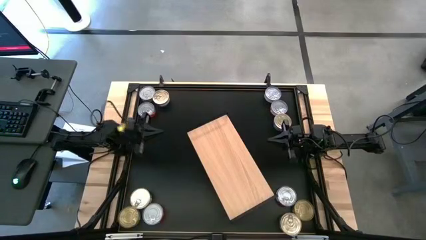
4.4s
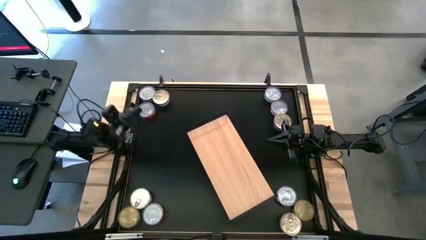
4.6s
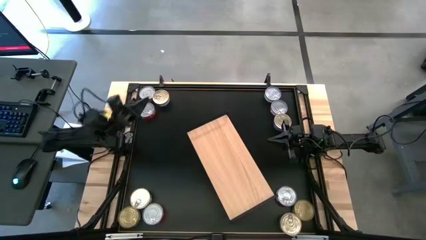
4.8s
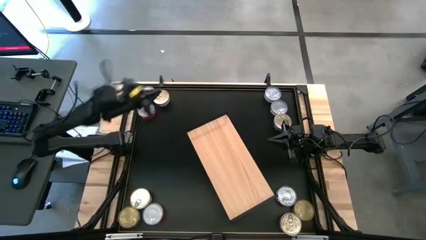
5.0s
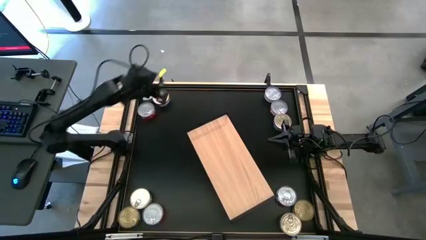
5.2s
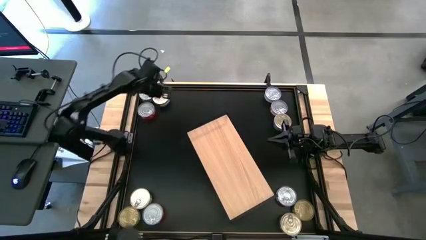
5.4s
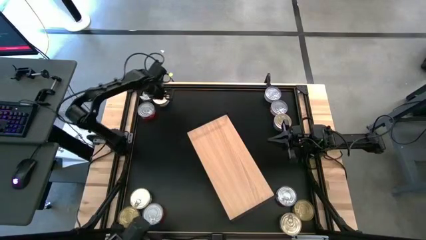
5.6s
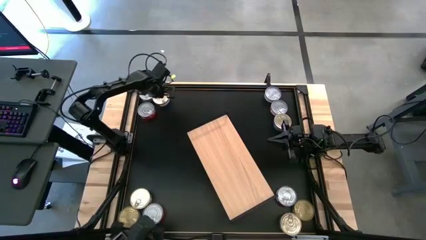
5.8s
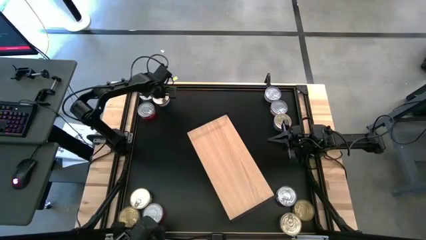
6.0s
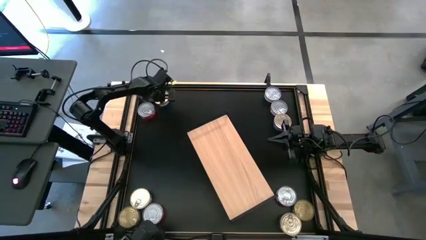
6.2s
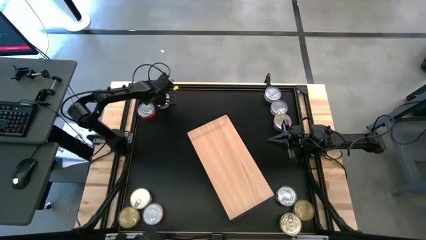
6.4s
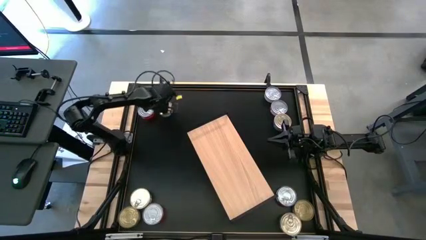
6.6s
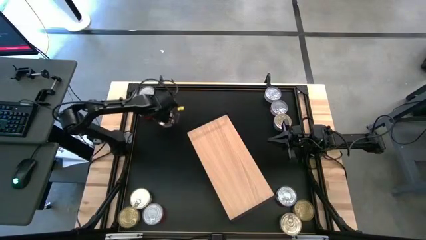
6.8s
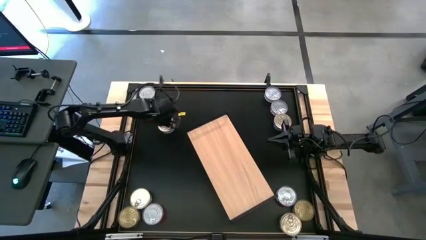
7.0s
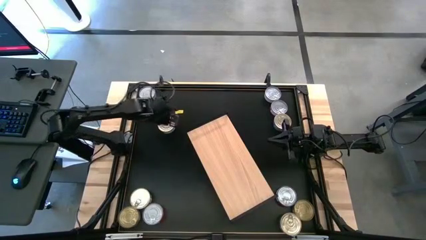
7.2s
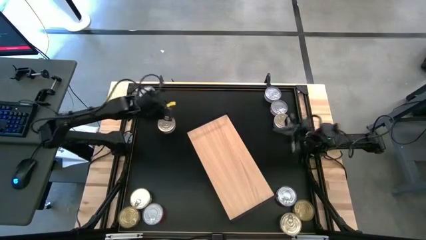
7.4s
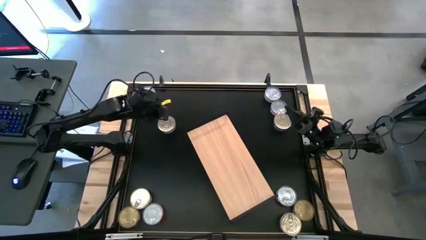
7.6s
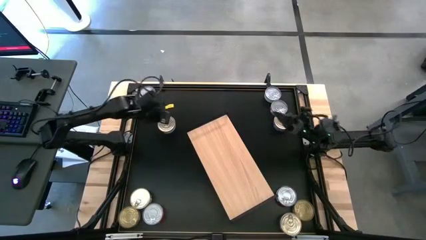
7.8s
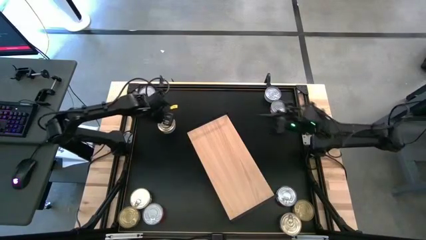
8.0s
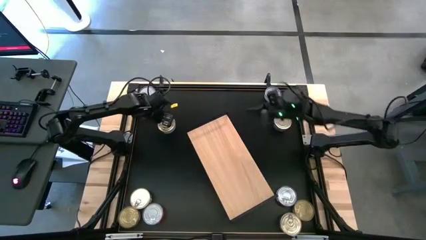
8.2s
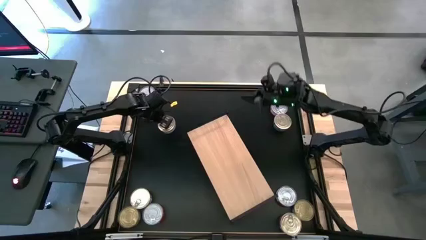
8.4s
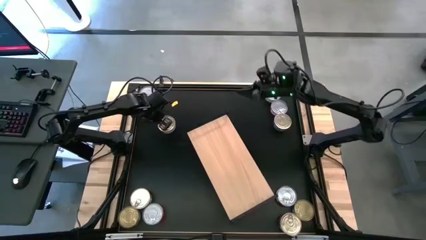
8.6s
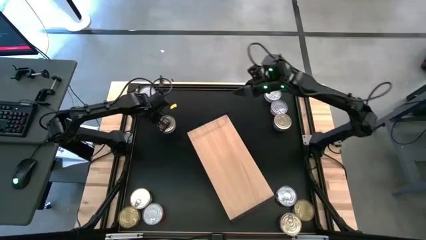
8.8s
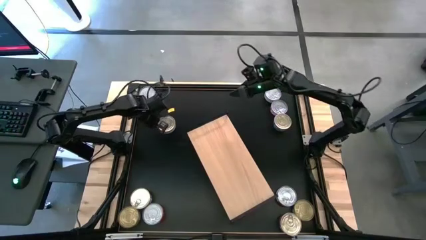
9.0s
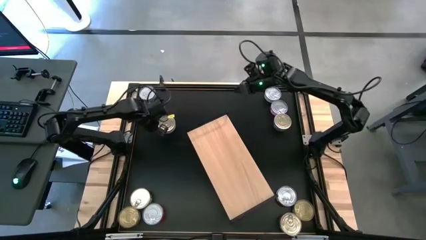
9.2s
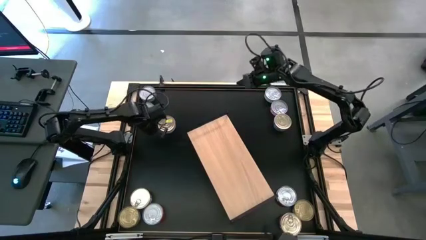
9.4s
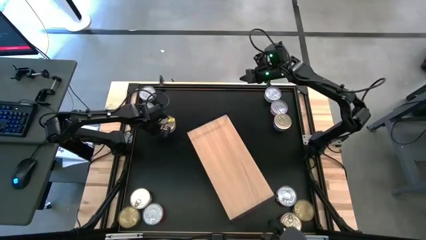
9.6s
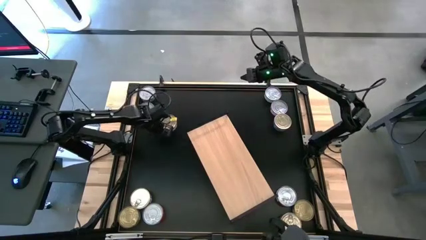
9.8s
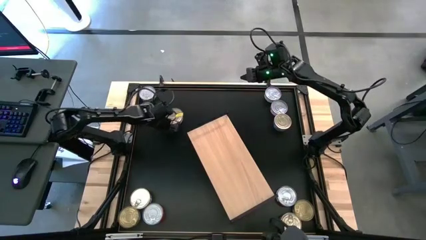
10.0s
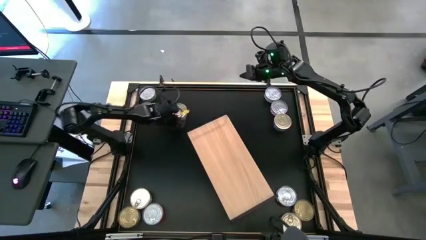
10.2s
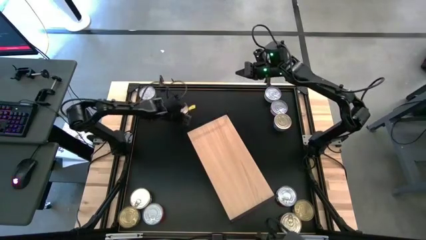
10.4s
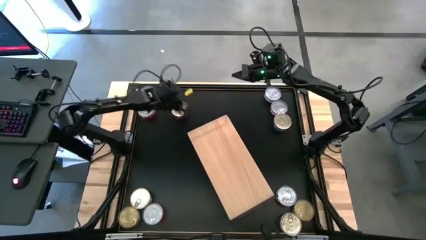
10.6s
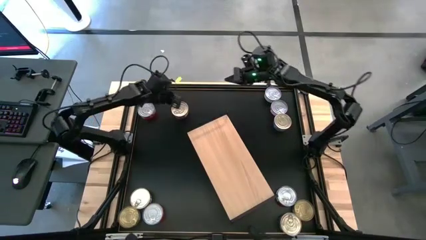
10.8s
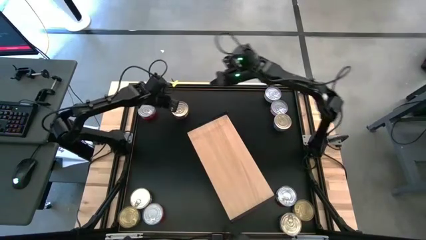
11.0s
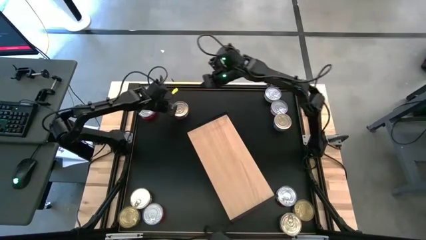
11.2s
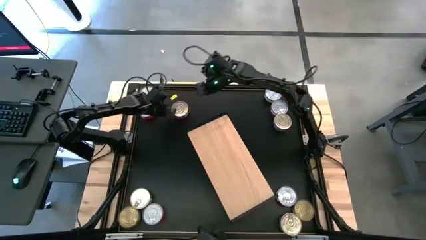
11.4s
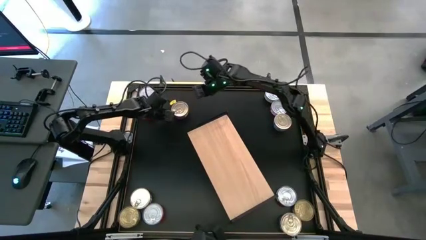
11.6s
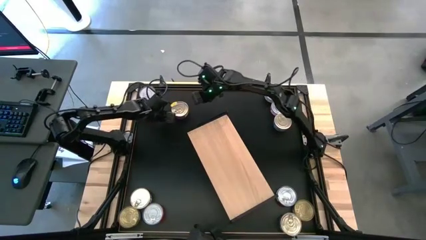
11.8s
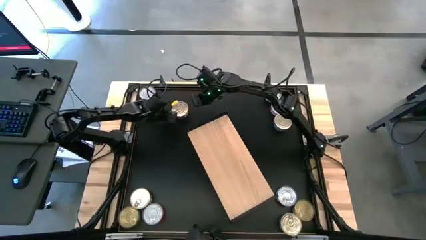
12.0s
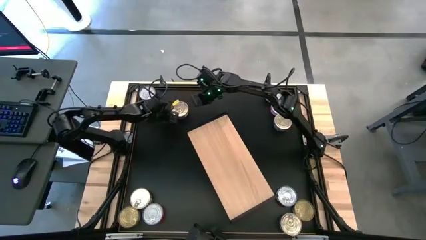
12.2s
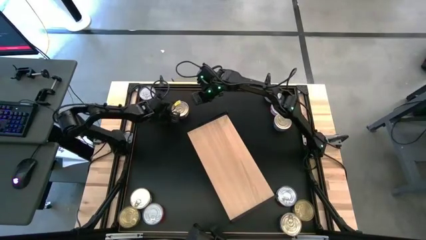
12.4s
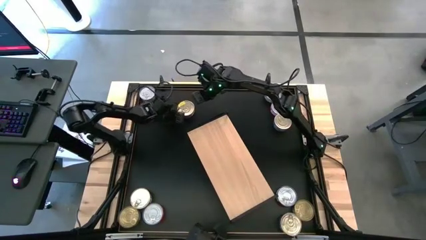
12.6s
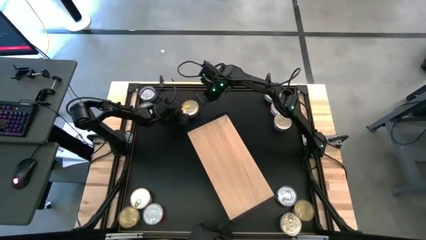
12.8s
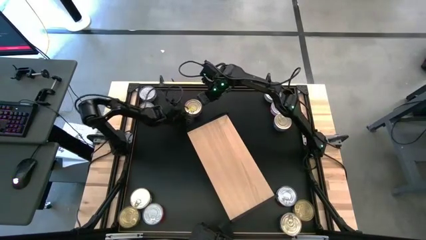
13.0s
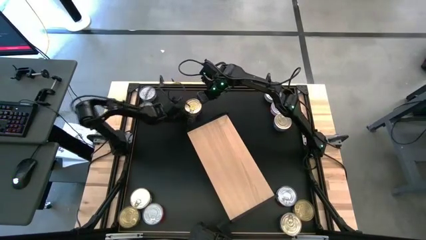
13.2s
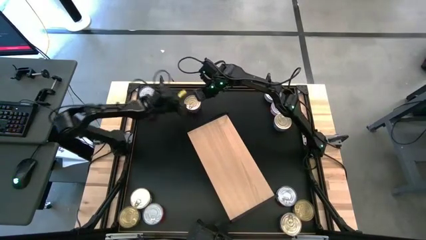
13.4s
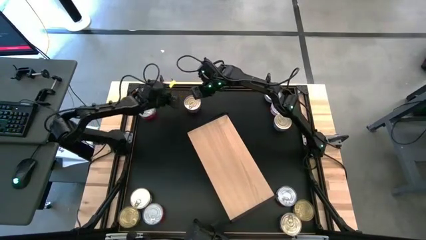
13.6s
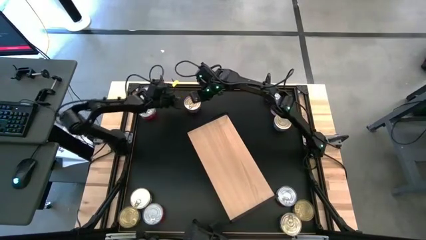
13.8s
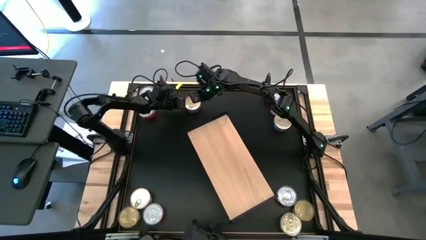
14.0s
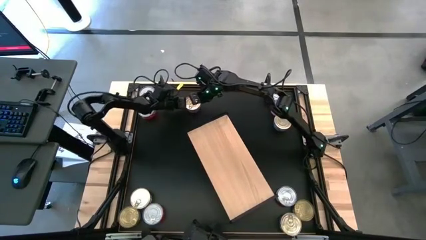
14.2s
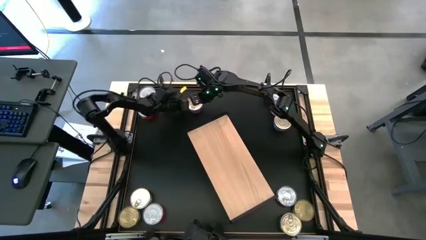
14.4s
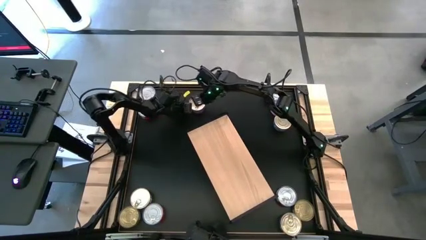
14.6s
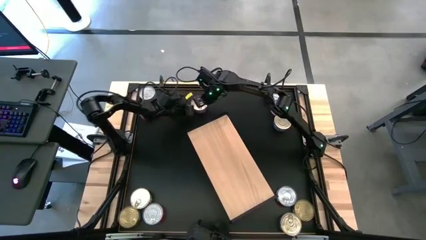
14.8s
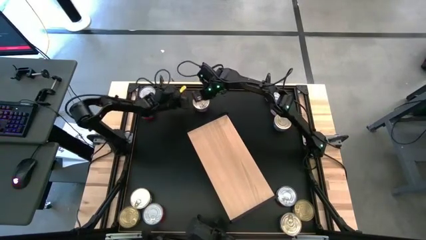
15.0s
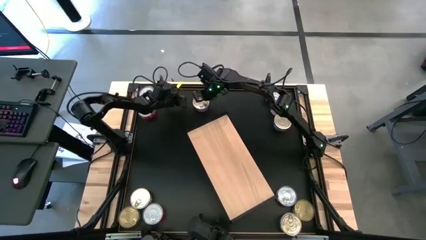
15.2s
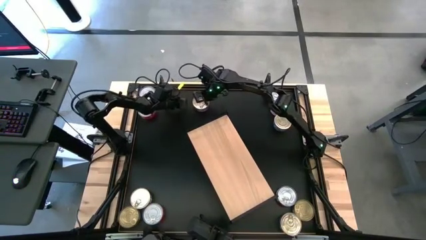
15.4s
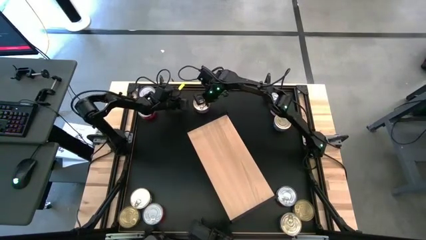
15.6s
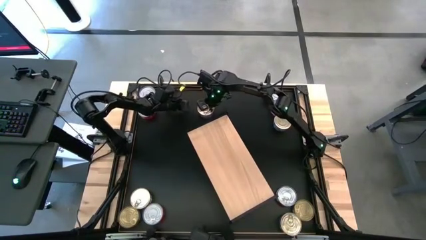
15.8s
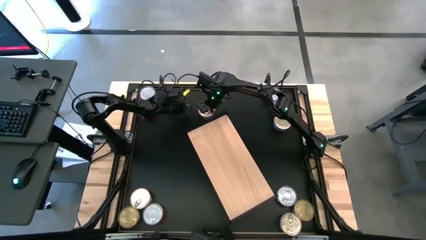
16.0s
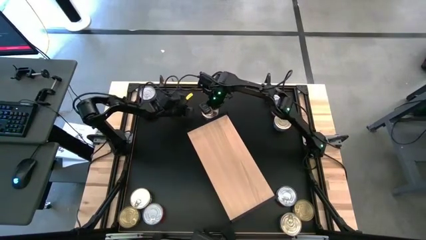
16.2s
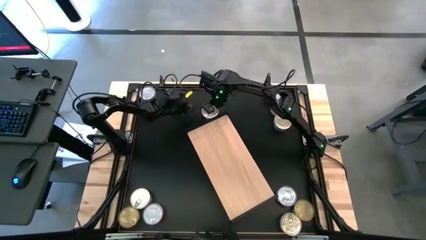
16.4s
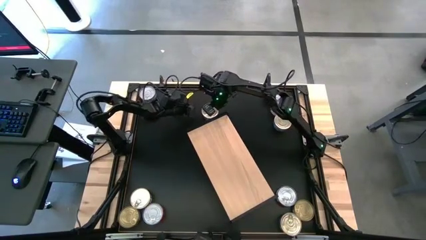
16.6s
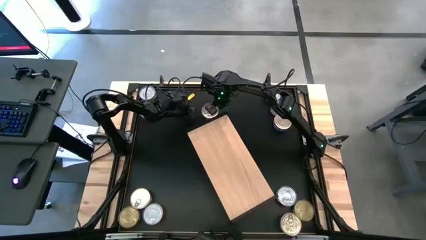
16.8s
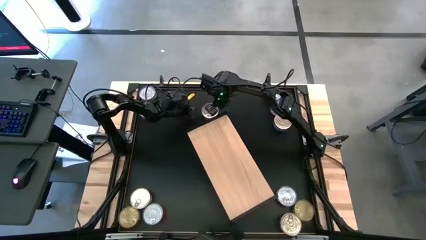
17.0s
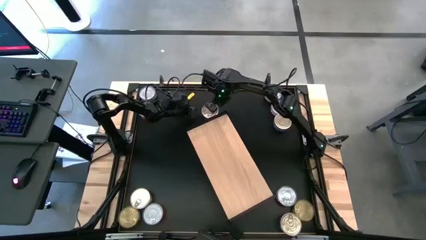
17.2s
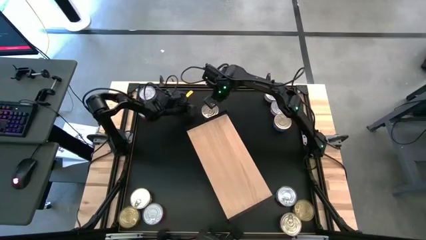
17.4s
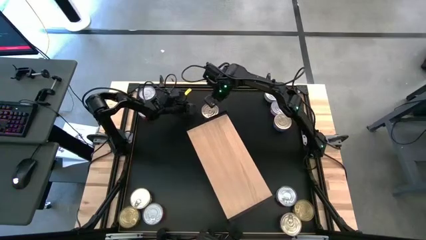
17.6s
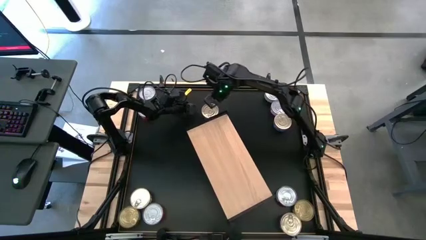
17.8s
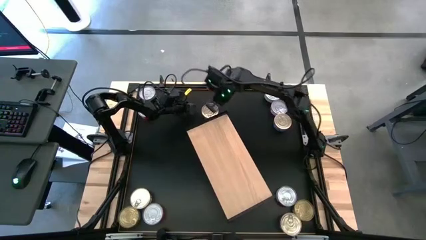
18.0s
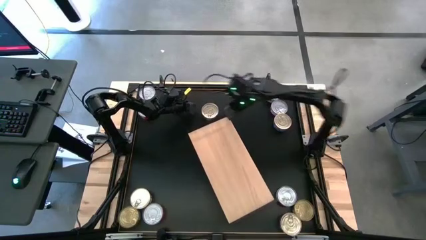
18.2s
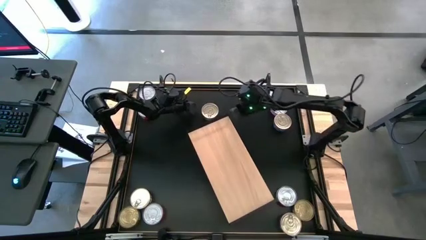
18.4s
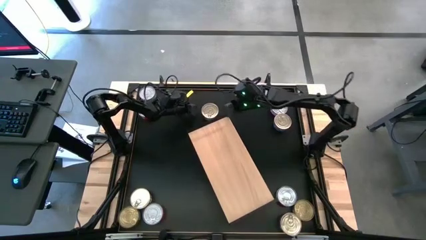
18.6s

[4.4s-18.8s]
Task: Stack canned seafood by type on shelf
Put the blue tuna can on the shelf
